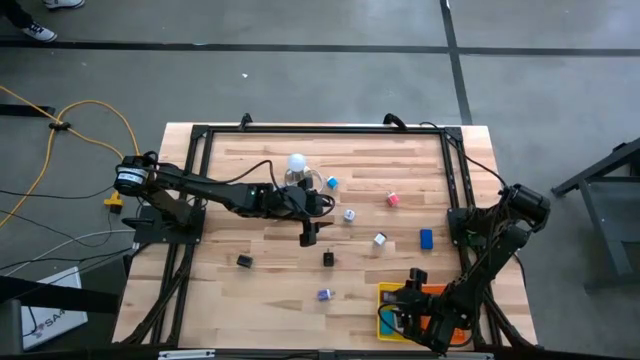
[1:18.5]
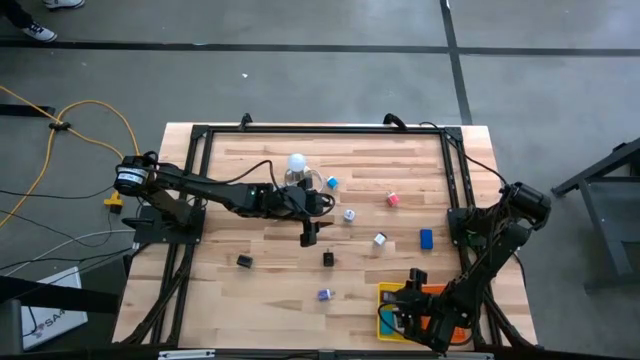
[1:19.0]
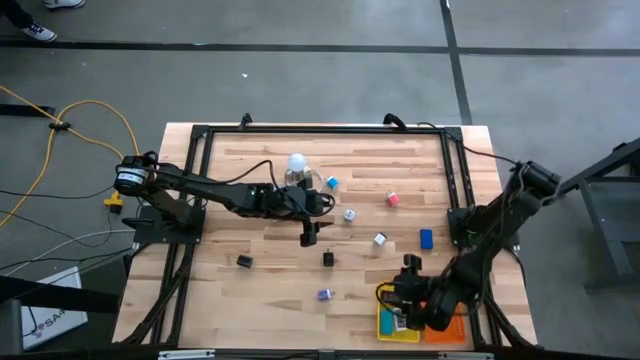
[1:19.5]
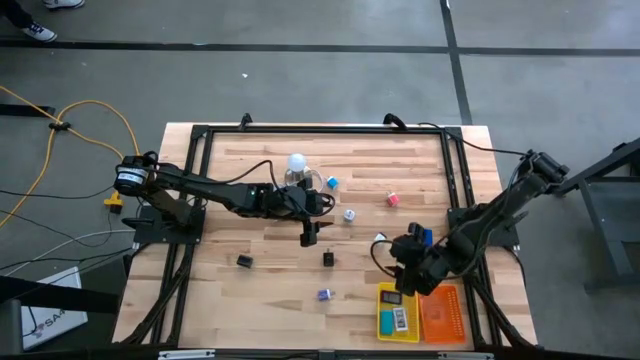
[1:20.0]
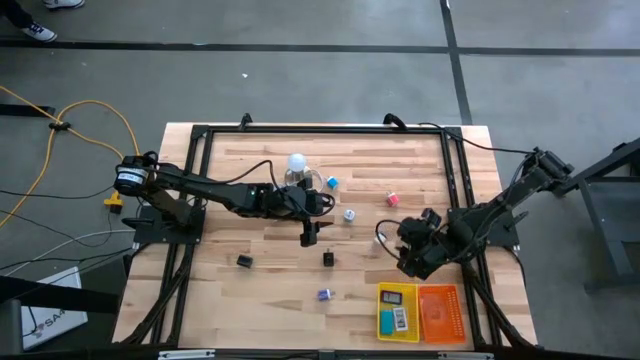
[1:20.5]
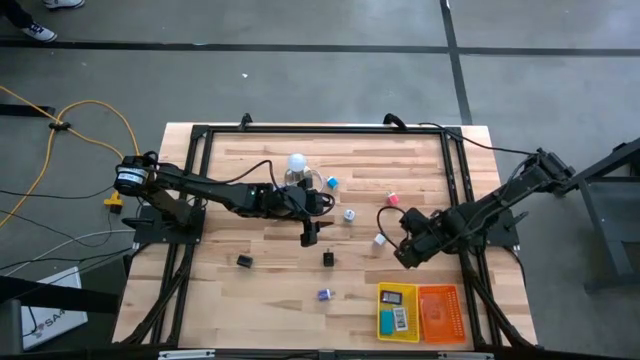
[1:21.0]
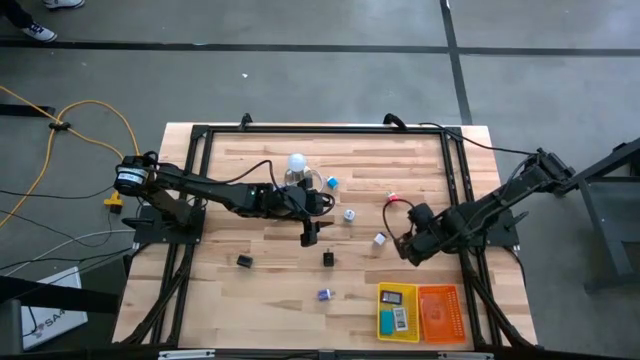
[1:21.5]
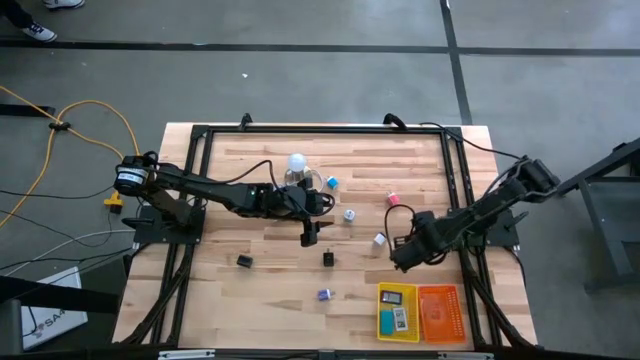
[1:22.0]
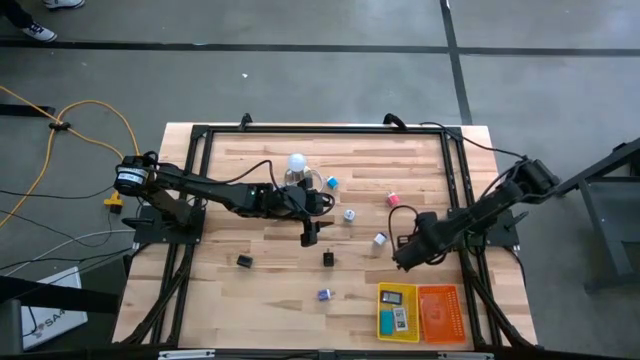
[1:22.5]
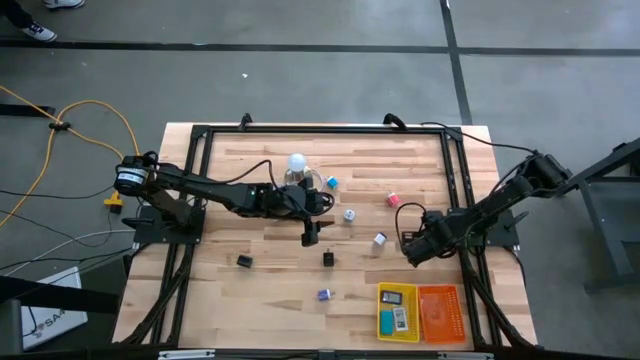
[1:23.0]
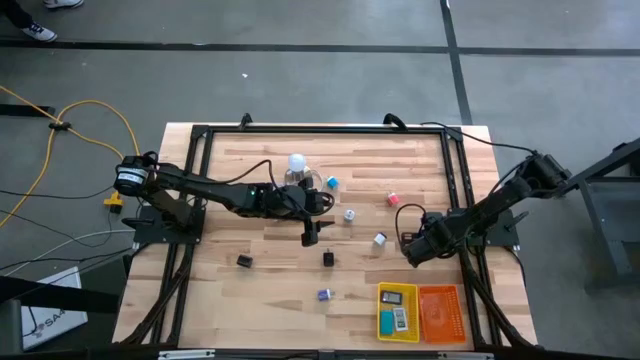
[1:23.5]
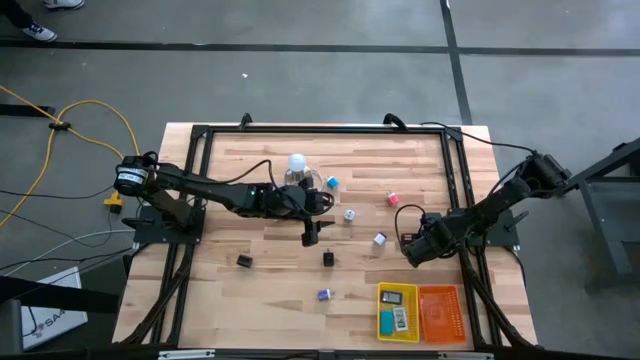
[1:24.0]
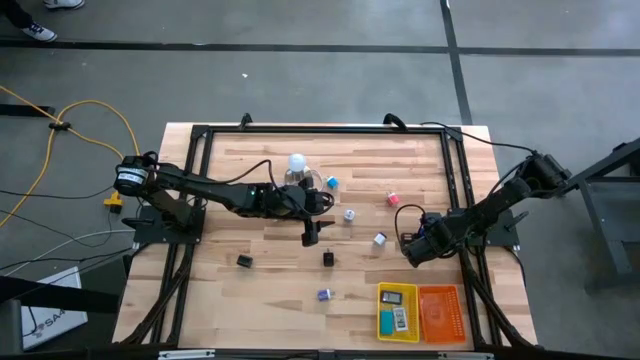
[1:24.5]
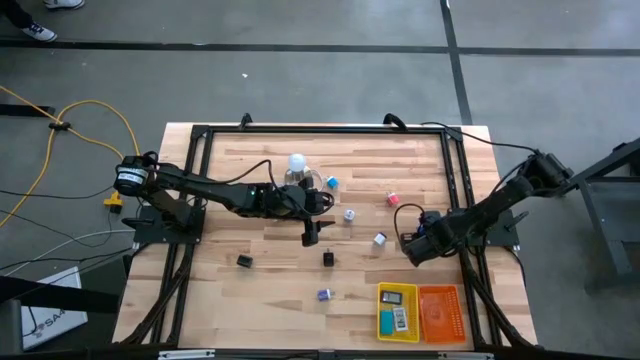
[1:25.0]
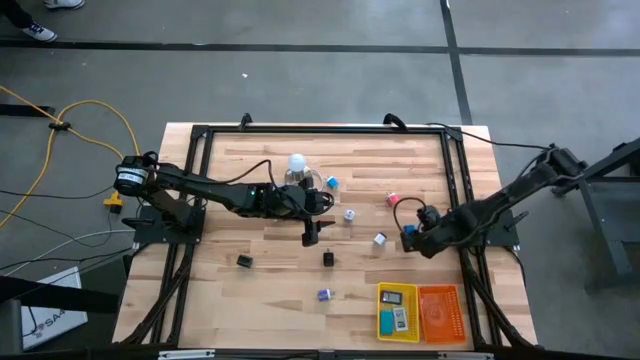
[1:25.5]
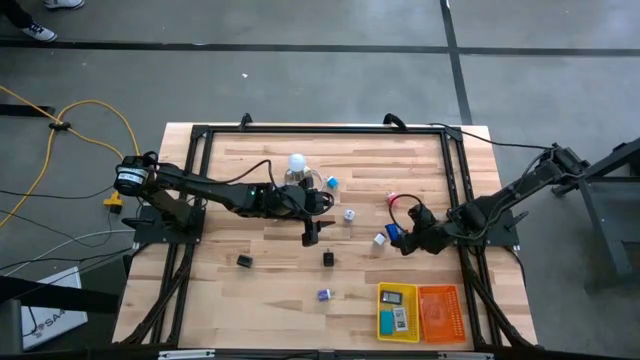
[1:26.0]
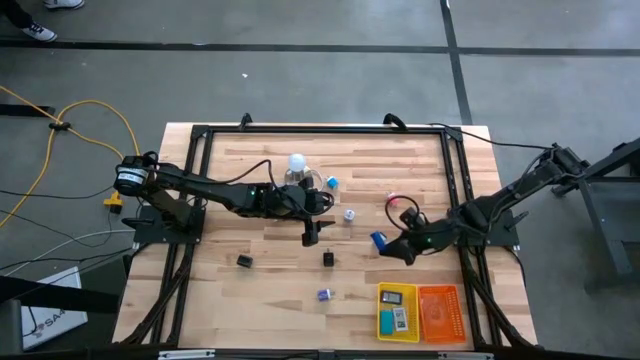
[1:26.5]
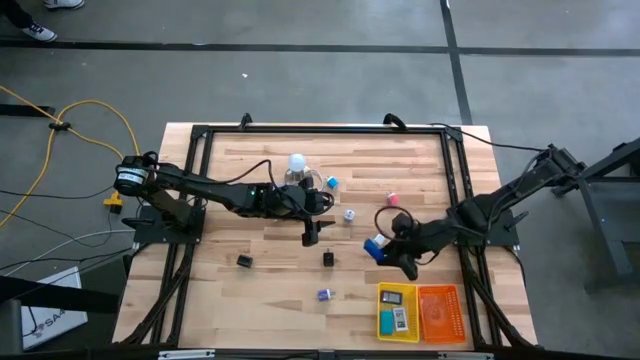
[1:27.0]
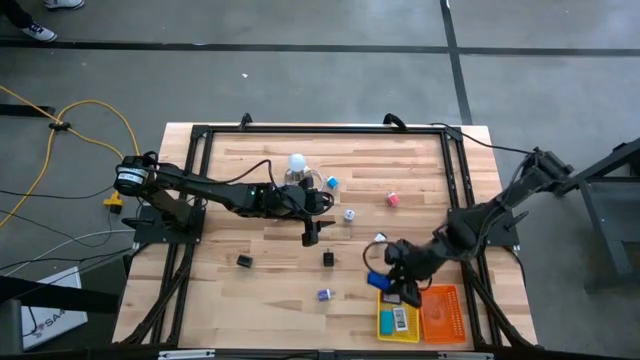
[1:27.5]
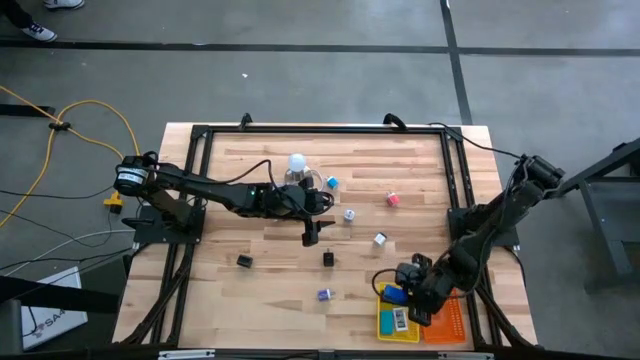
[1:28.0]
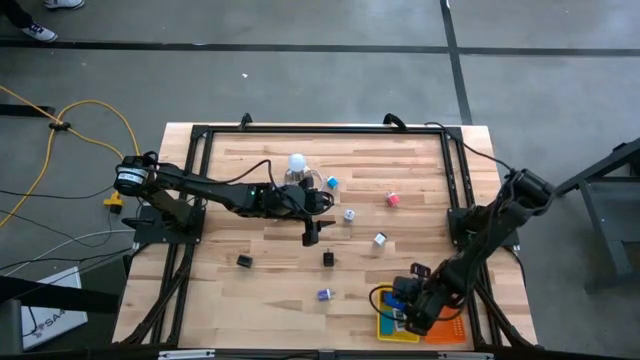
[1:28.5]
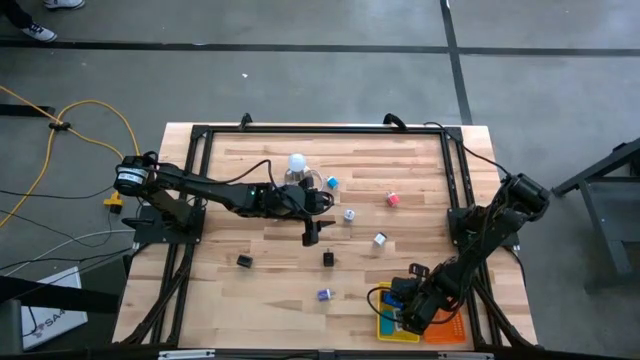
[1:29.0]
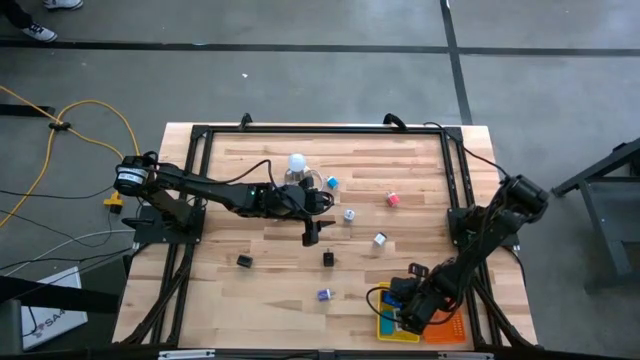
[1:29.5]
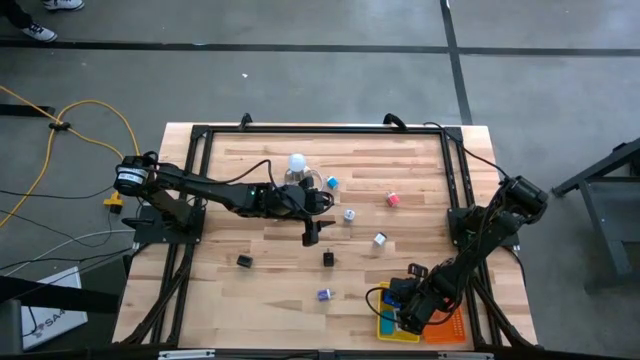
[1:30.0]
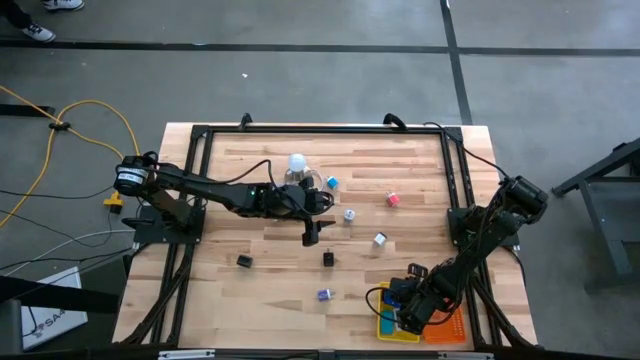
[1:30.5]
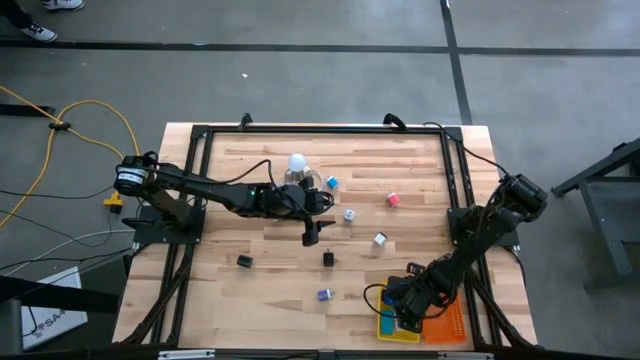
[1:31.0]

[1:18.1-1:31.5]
Task: Pick & Place Office items
Put the blue digital clock into the yellow basket
